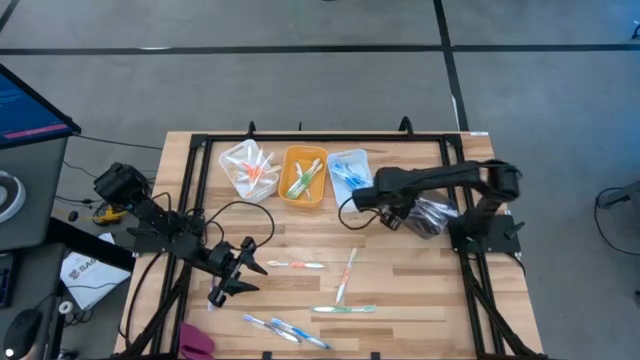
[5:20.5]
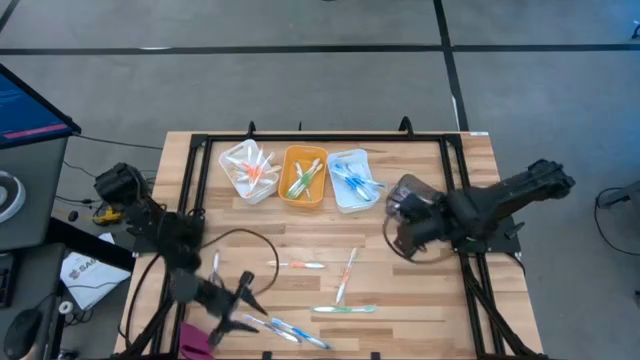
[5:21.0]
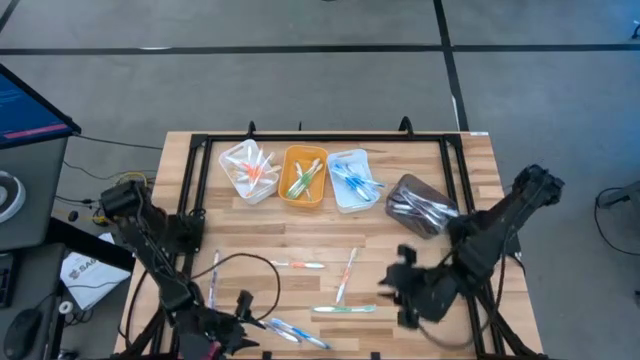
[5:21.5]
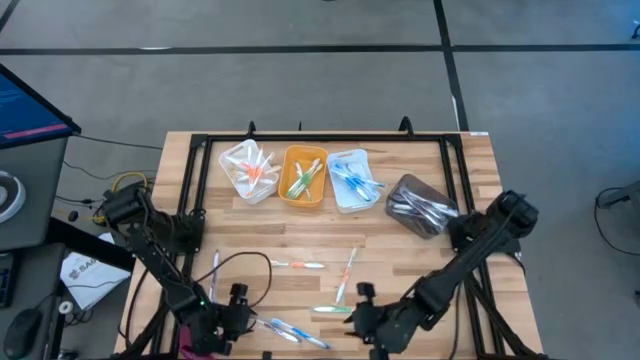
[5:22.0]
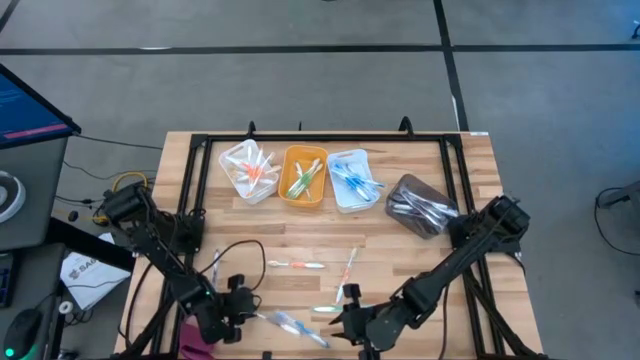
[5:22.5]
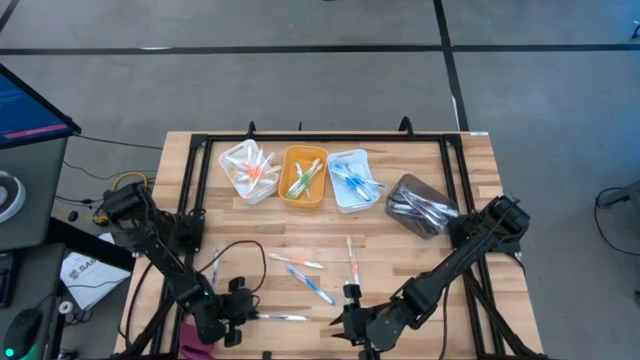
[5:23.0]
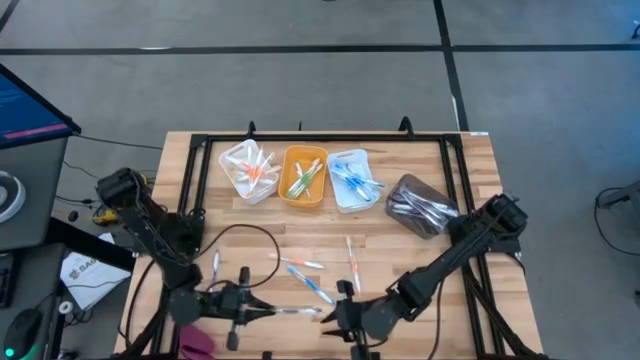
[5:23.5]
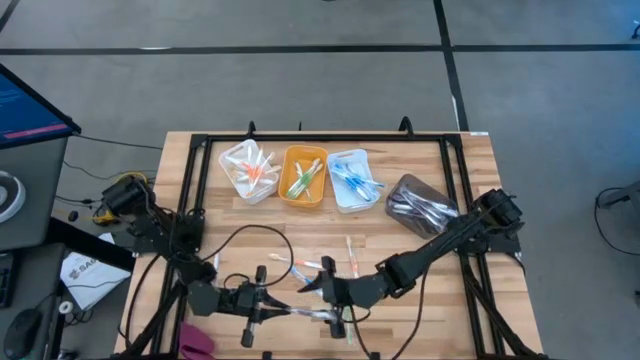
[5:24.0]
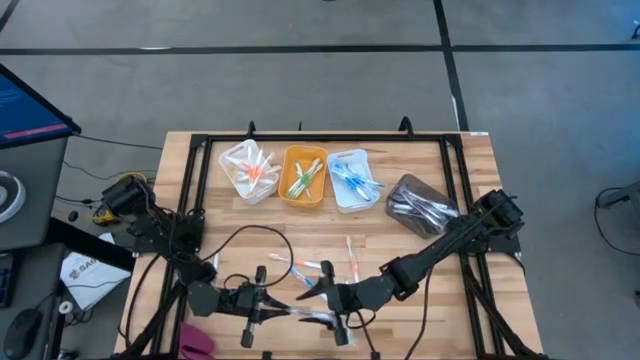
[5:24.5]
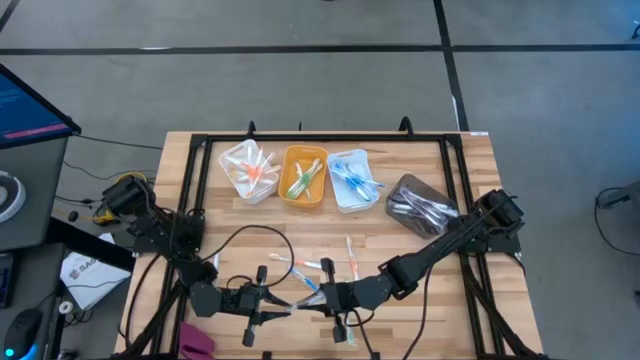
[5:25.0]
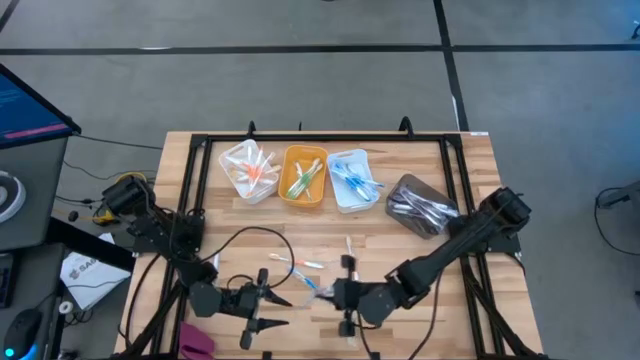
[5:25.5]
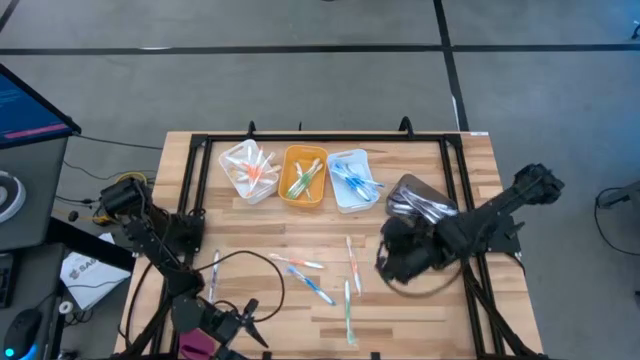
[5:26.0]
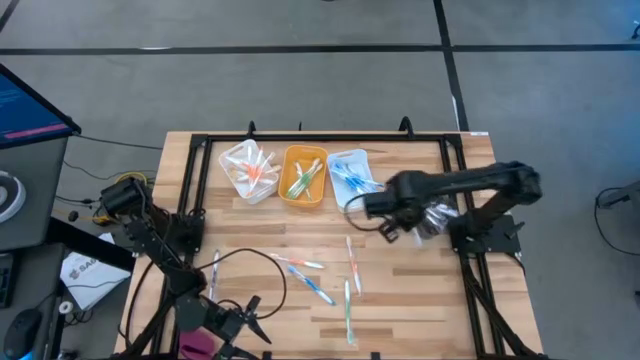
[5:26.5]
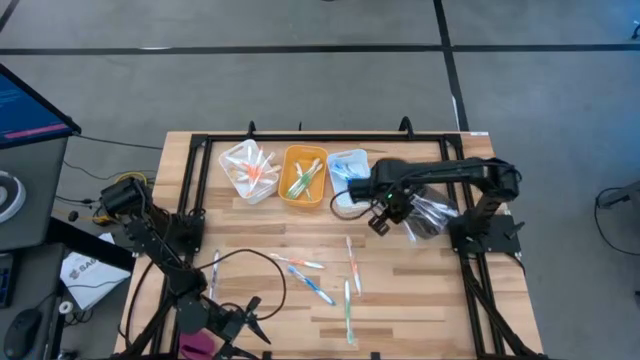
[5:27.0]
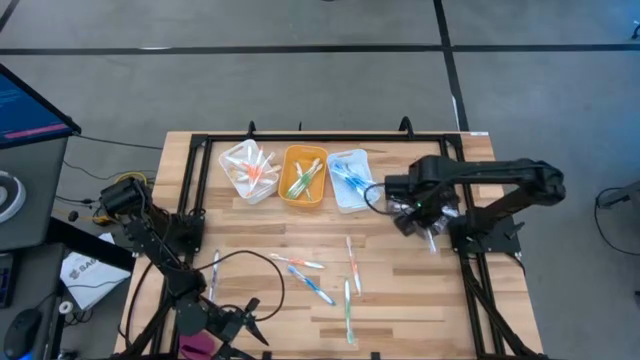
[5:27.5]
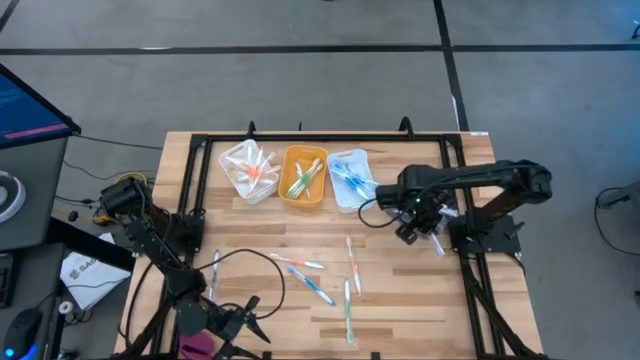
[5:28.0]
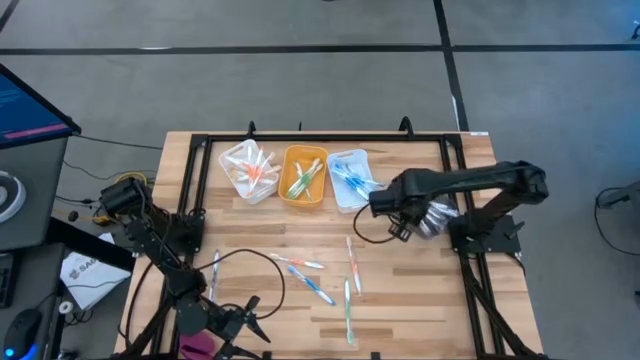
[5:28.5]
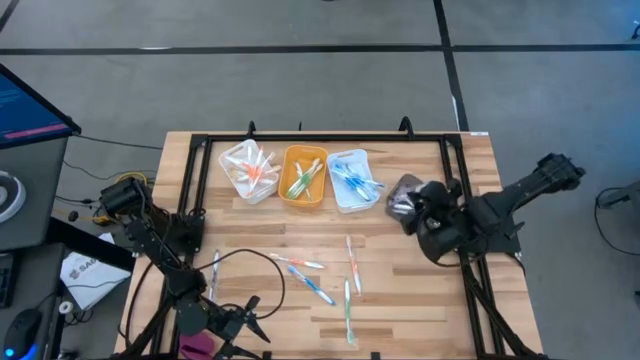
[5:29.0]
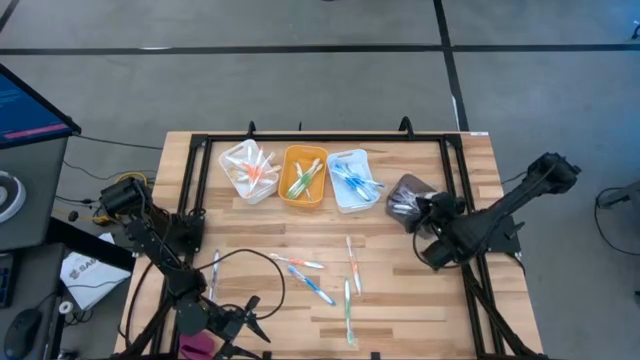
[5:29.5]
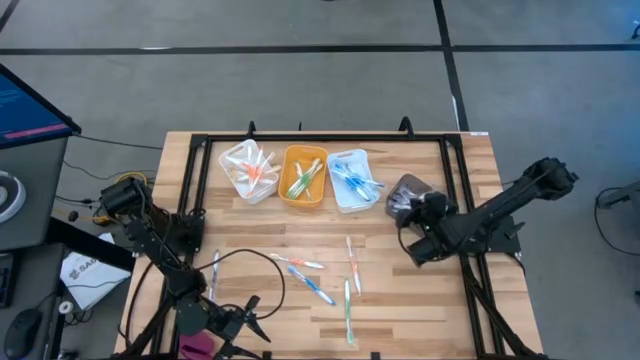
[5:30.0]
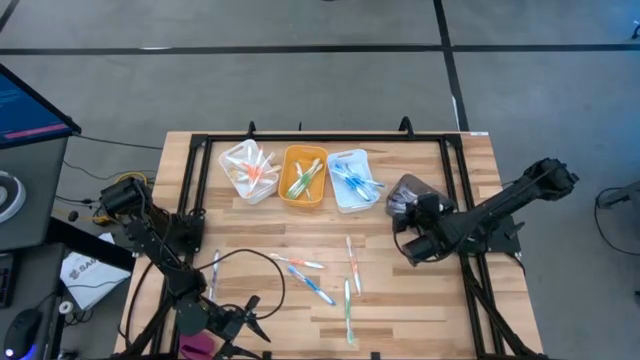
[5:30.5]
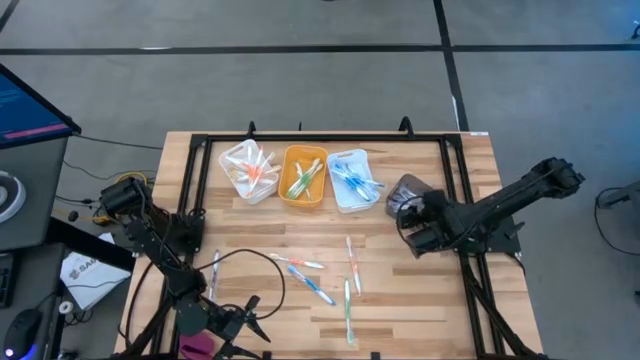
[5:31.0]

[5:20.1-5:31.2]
Task: Pick & Place Toothbrushes
Put the white violet toothbrush into the black transparent bin

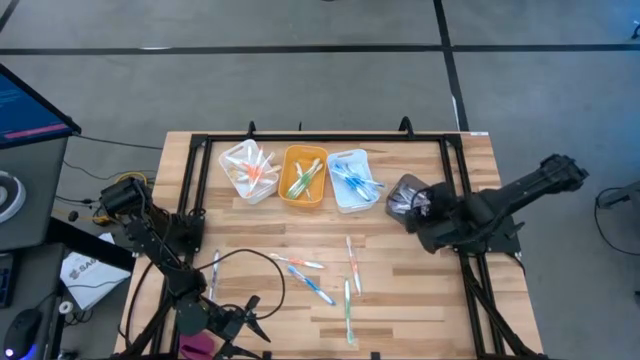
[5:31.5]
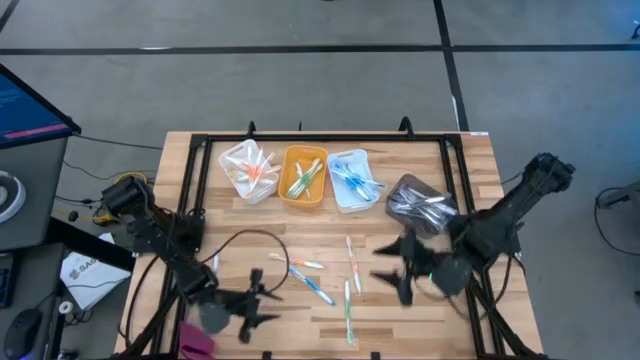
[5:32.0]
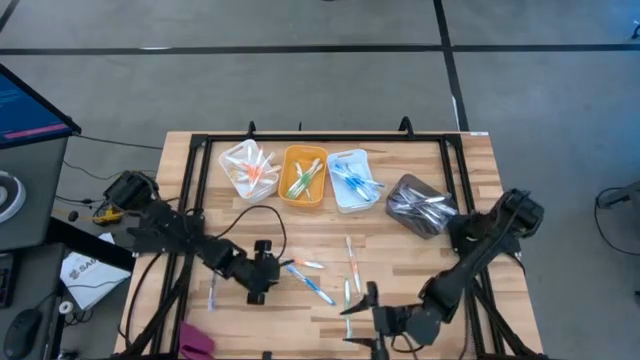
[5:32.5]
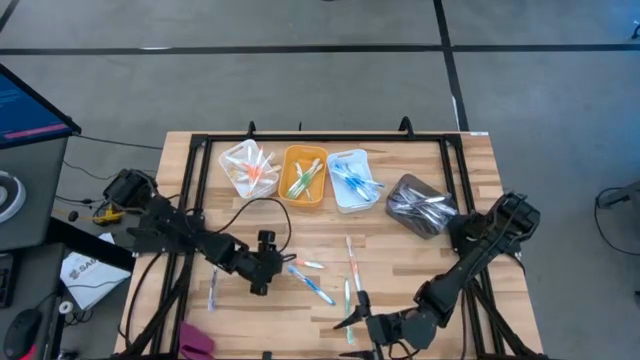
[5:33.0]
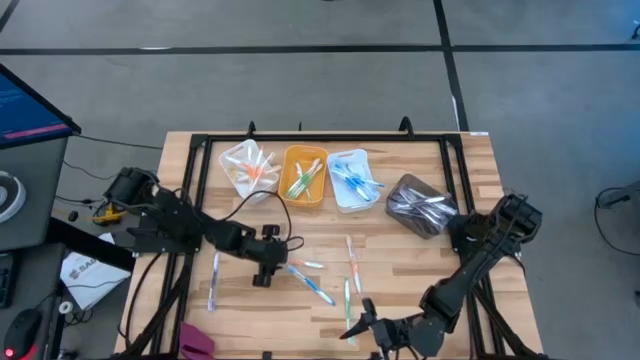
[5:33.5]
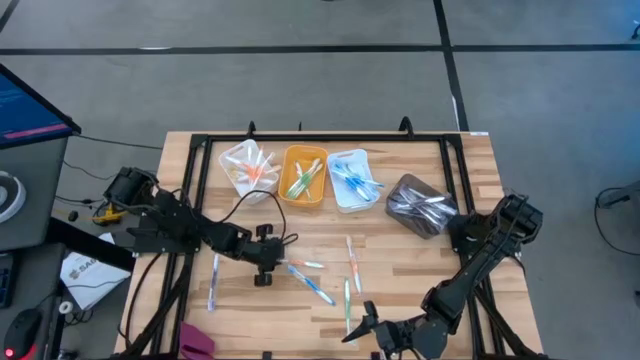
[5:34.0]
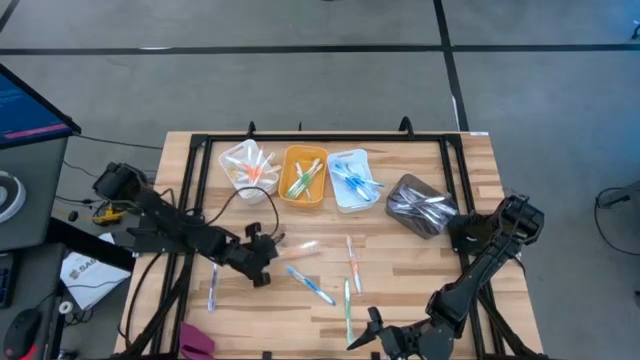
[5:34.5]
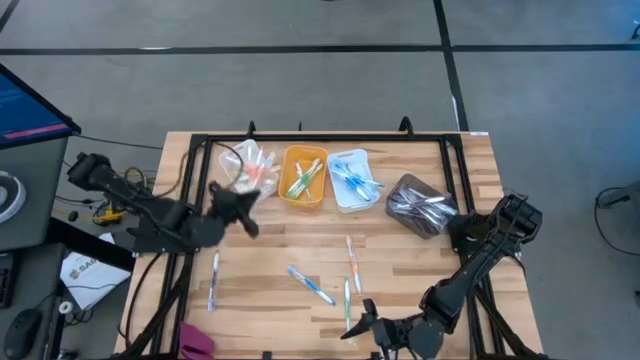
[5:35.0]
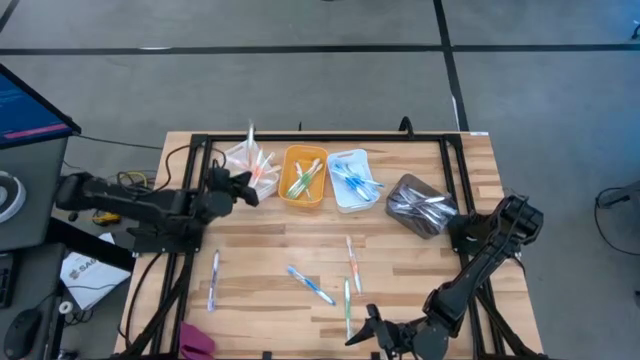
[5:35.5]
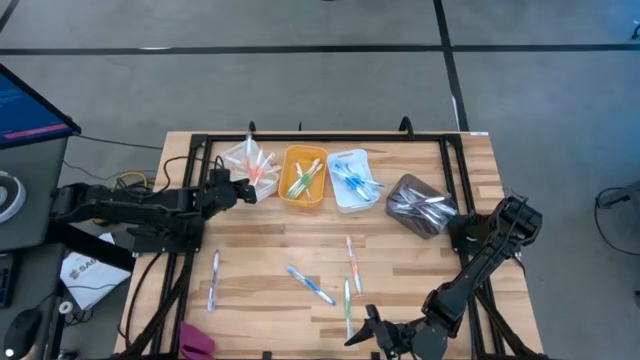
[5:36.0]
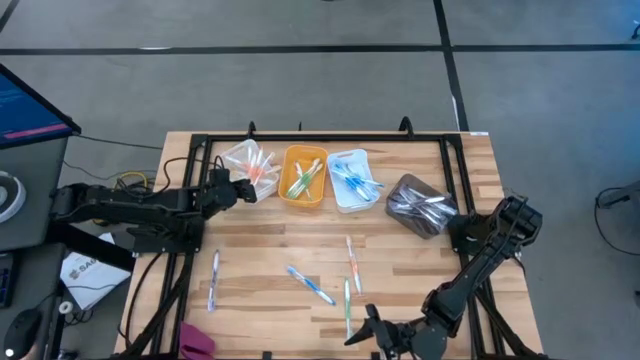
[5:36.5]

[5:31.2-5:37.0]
Put the white orange toothbrush into the left white bin

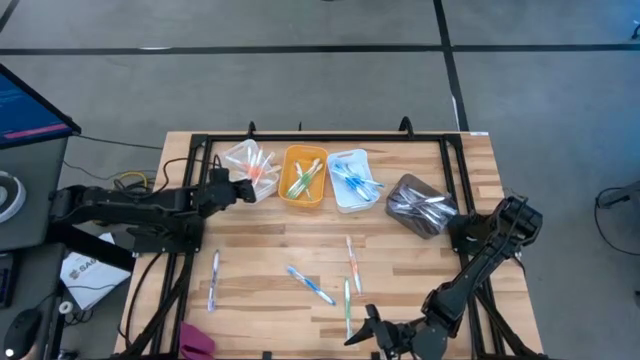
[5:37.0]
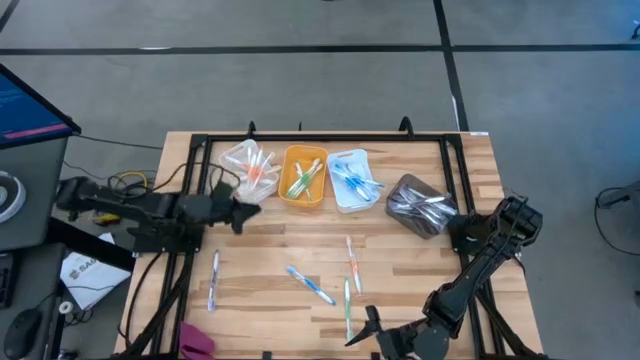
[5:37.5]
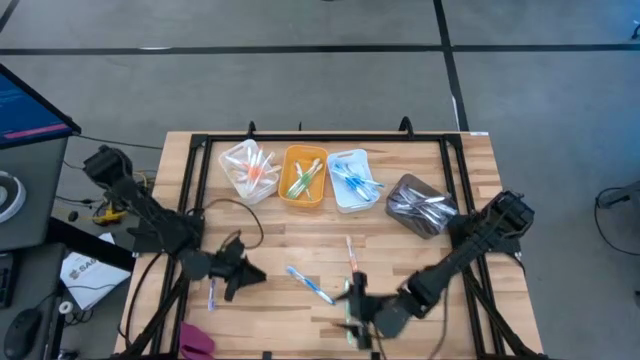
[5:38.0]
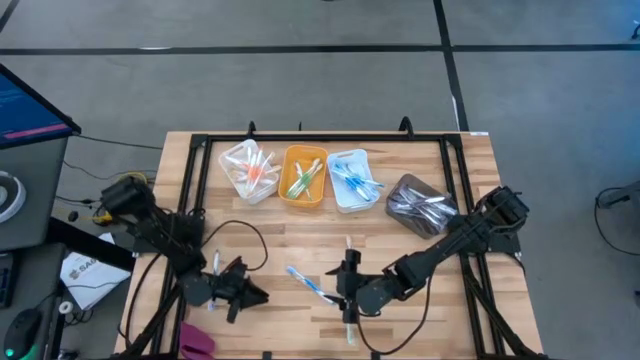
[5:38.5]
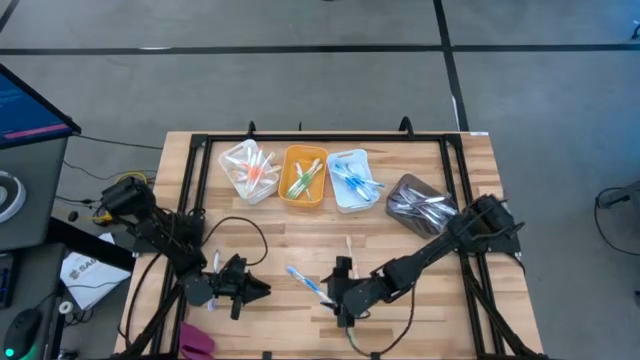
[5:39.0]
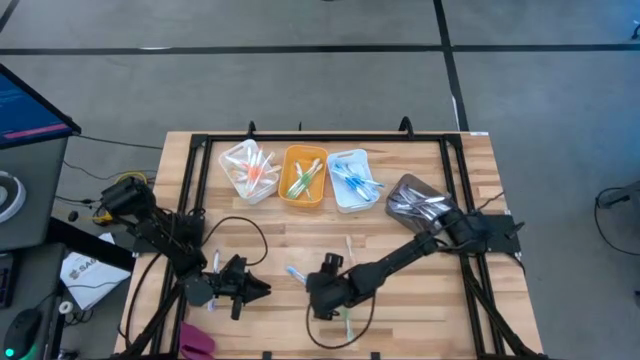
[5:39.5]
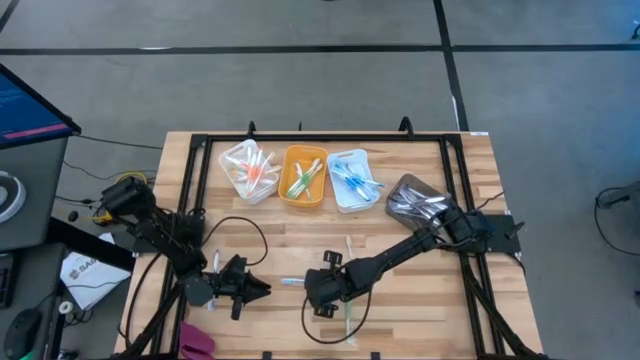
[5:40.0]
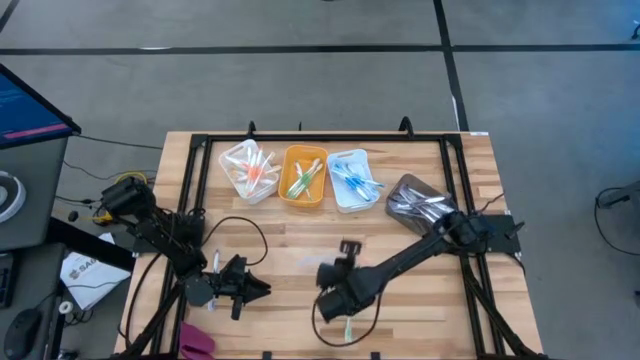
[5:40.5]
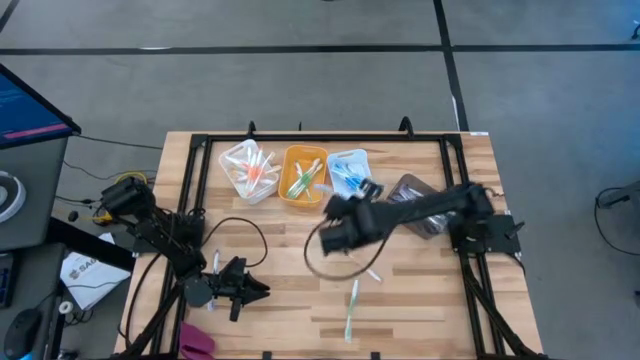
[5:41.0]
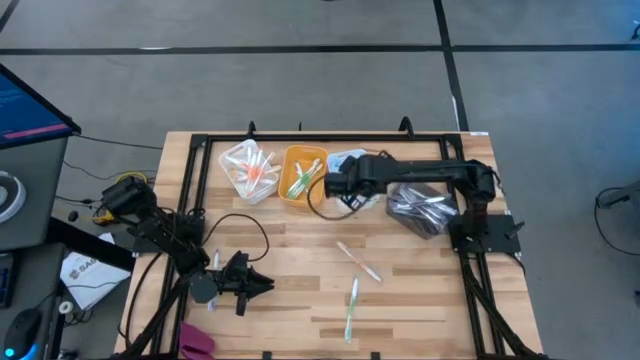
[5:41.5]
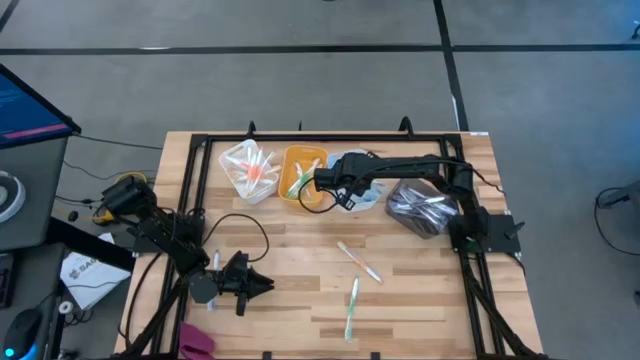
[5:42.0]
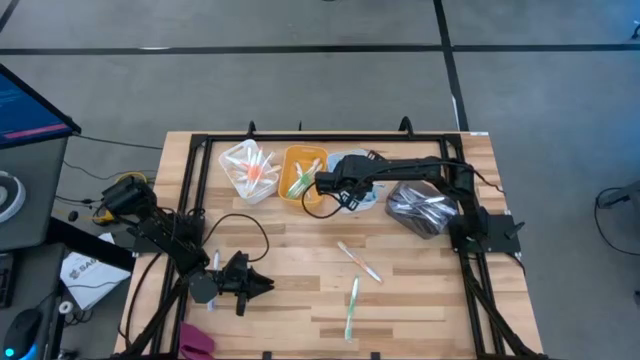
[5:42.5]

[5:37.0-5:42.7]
Put the white blue toothbrush into the right white bin
